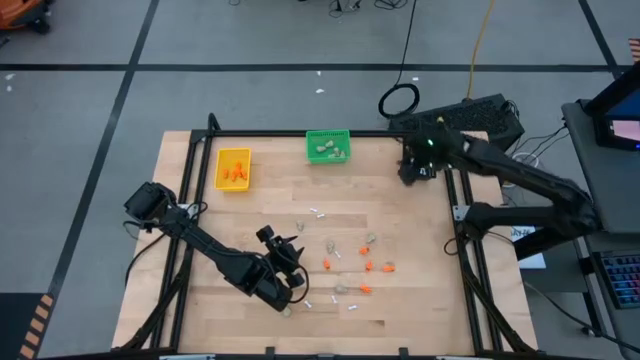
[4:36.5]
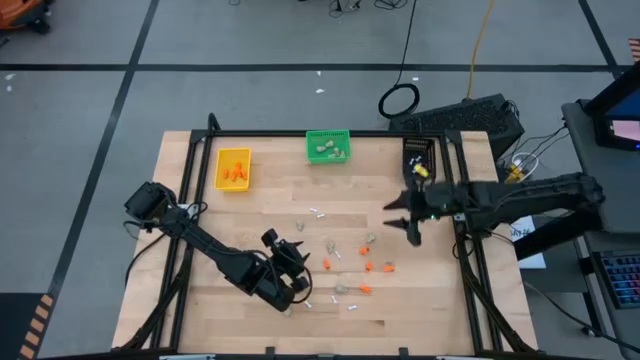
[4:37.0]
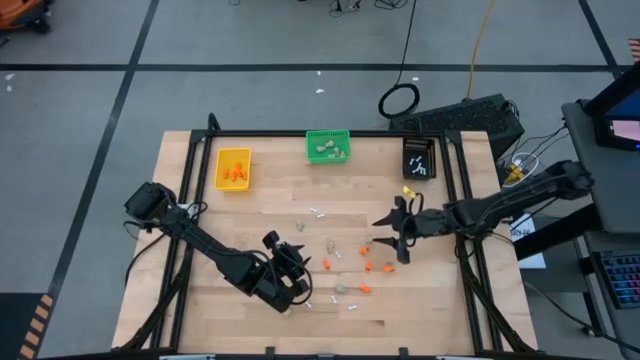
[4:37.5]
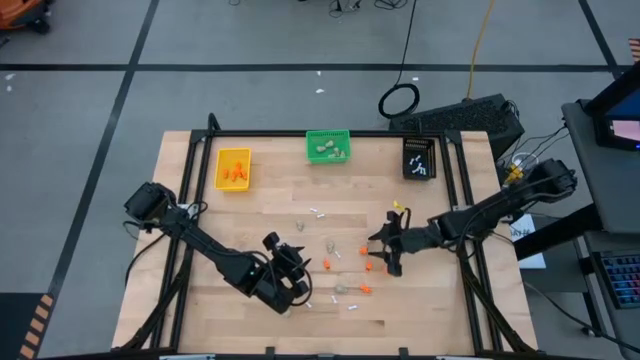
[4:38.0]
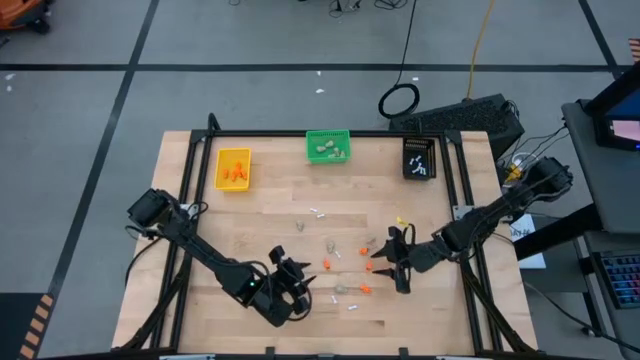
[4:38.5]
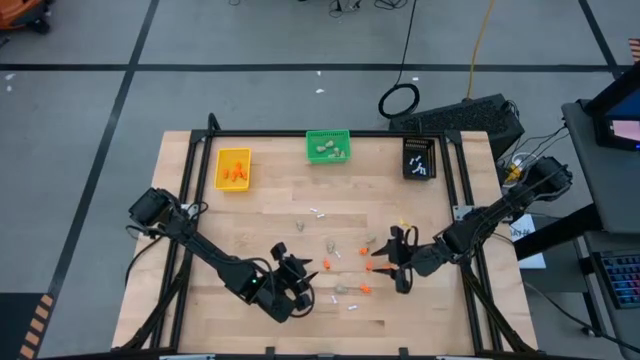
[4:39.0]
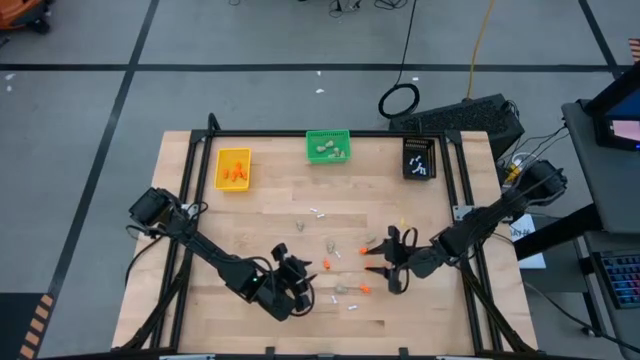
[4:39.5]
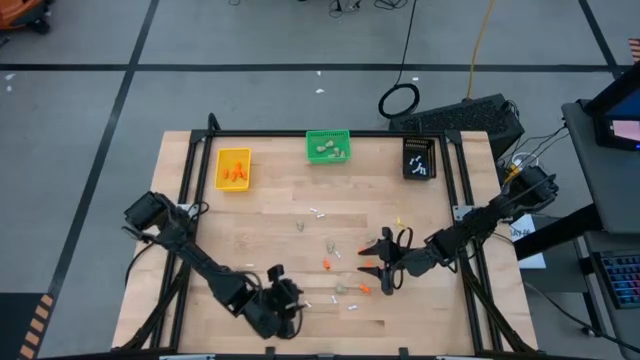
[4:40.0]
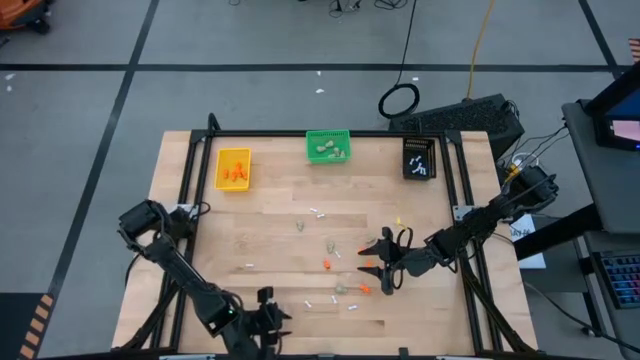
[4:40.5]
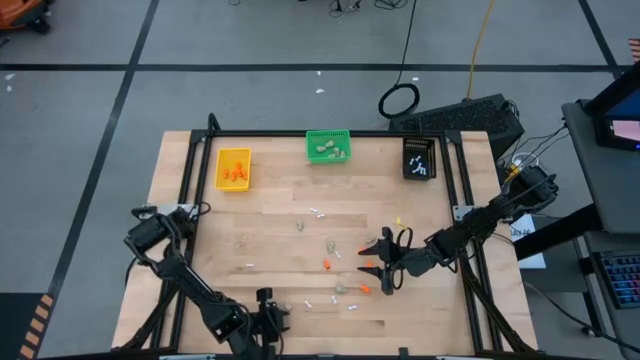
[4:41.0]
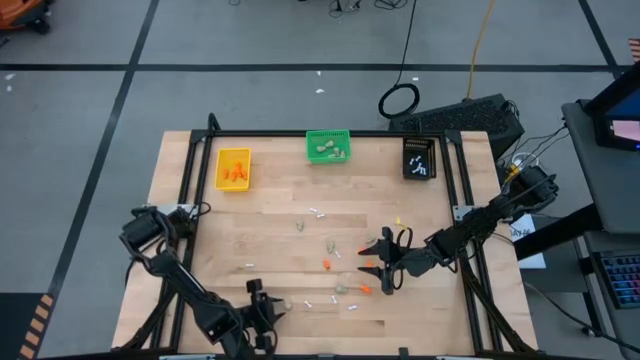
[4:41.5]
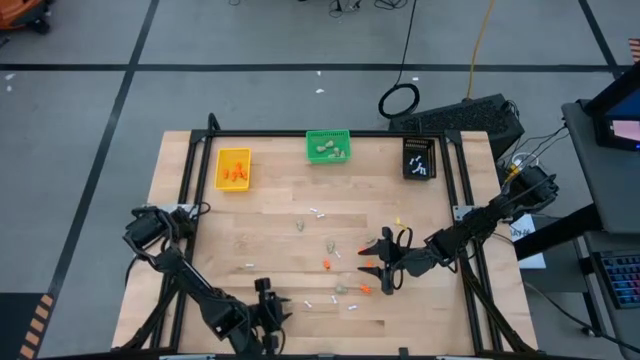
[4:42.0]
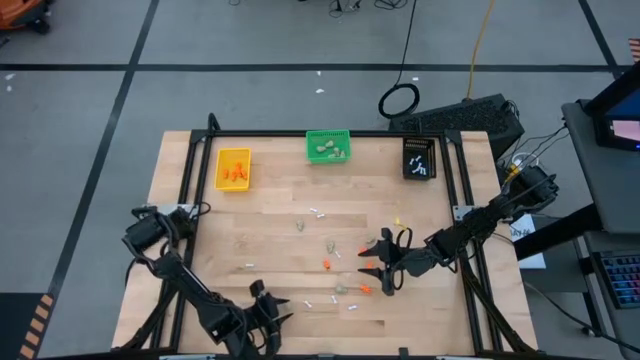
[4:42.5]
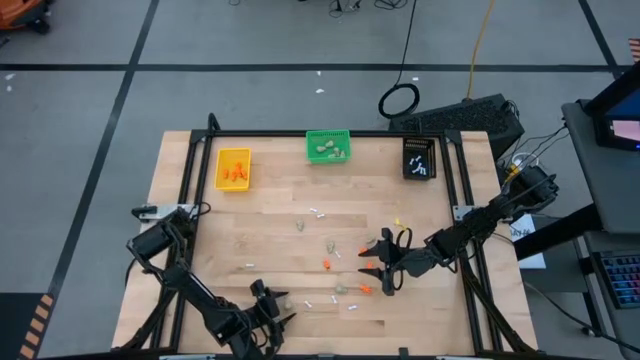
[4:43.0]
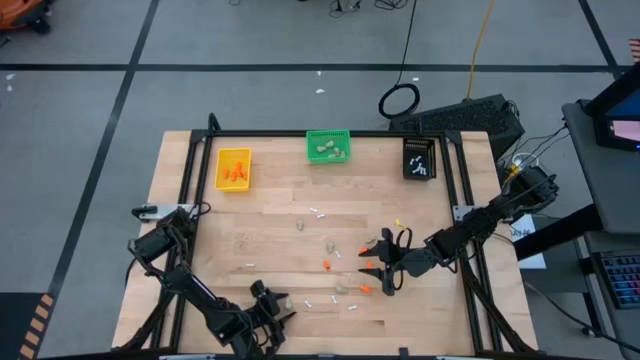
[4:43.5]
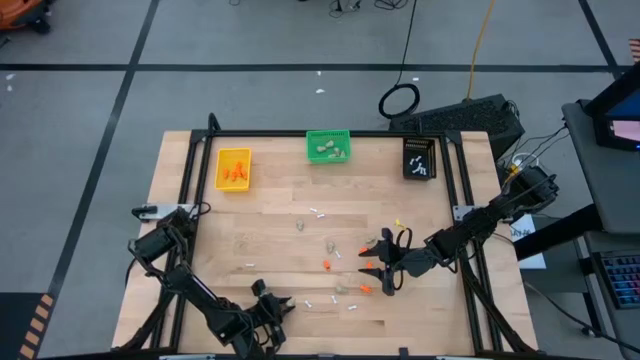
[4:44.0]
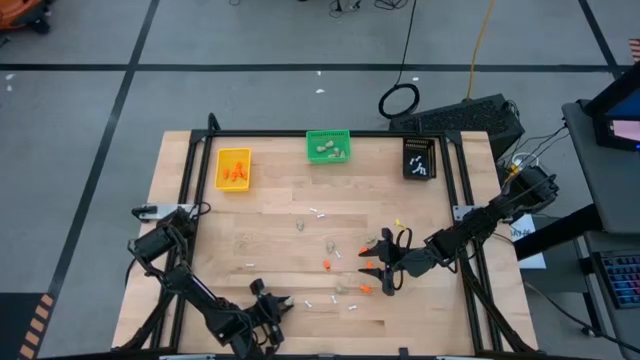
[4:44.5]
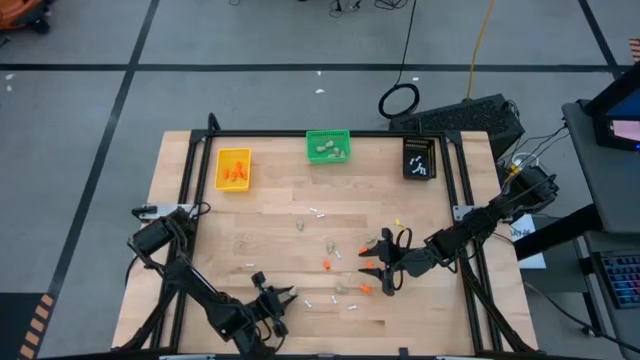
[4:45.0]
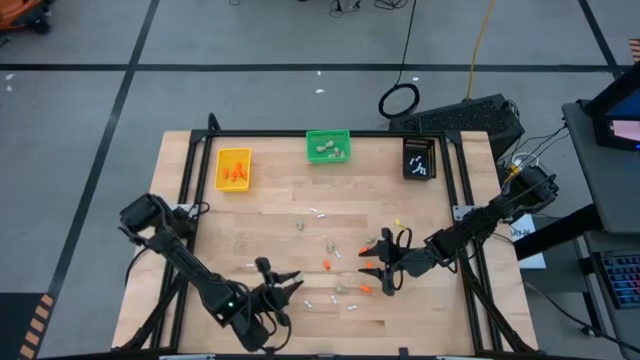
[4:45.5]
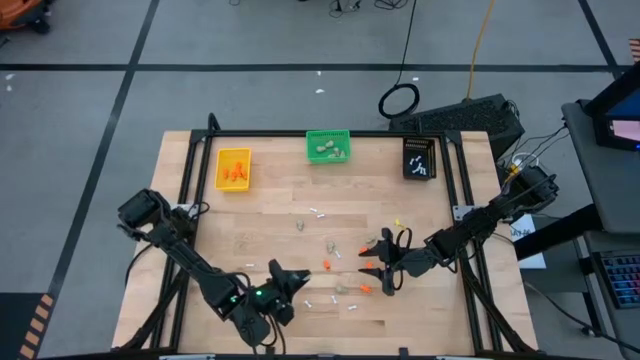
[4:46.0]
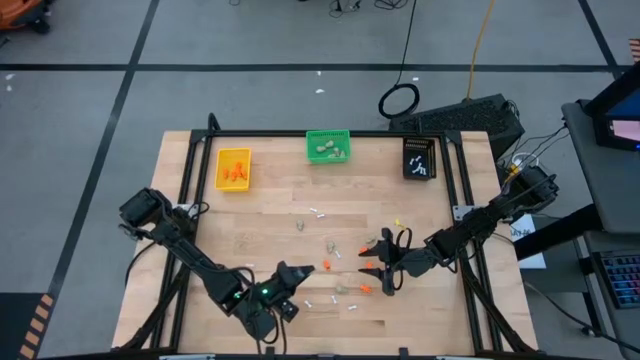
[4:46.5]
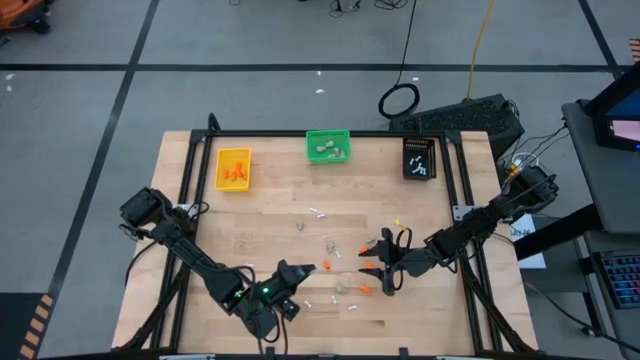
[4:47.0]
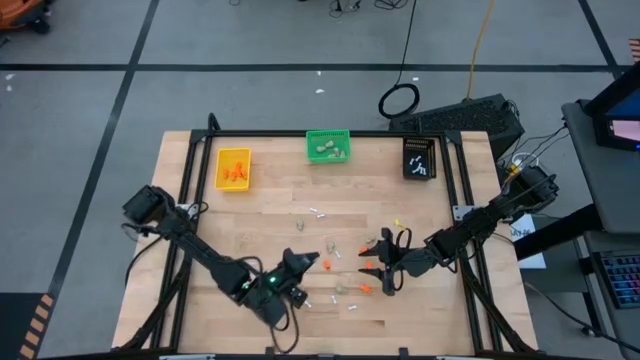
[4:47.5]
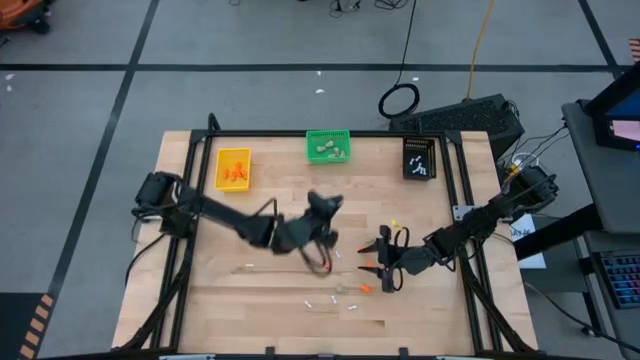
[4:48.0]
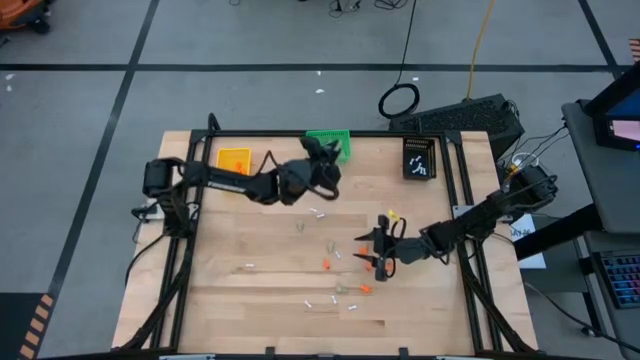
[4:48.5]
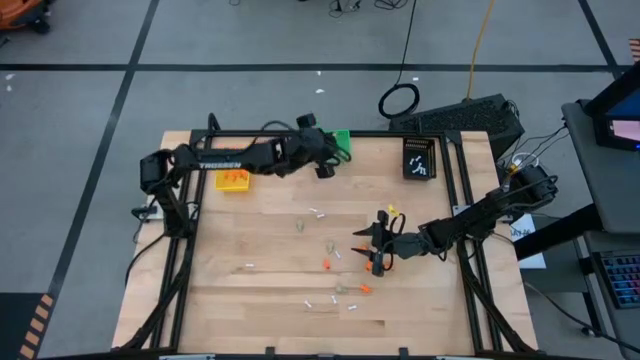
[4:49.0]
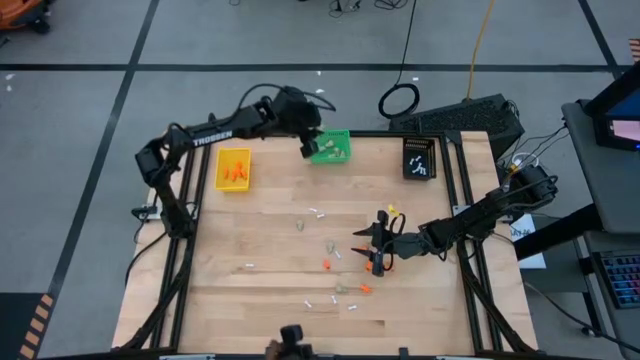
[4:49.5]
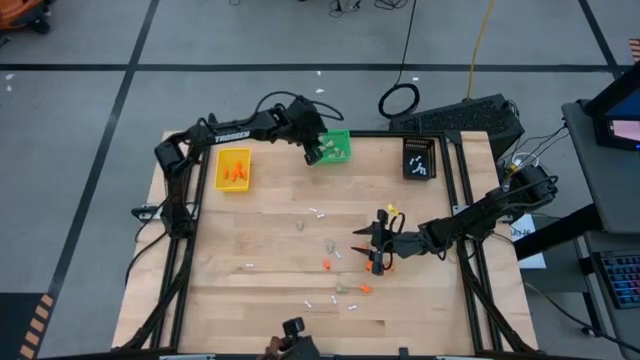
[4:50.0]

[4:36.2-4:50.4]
Task: Sort Halloween decoration
Put the gray skull toy into the green bin

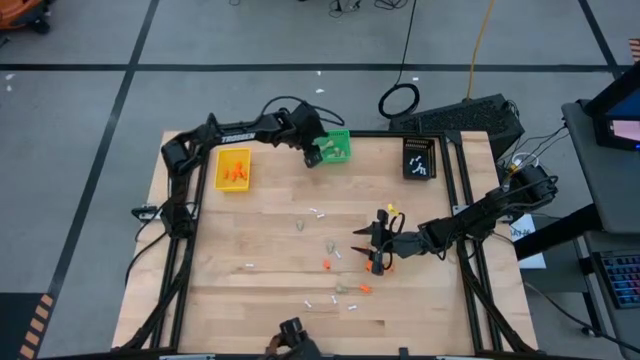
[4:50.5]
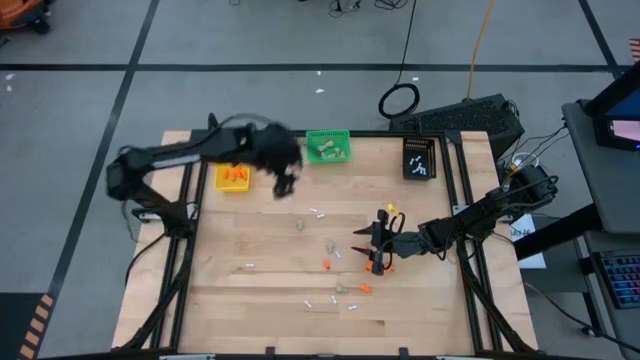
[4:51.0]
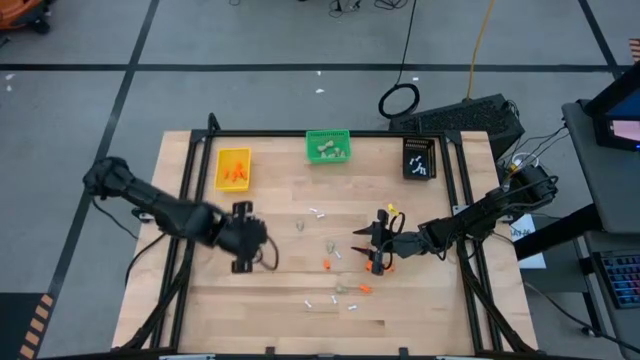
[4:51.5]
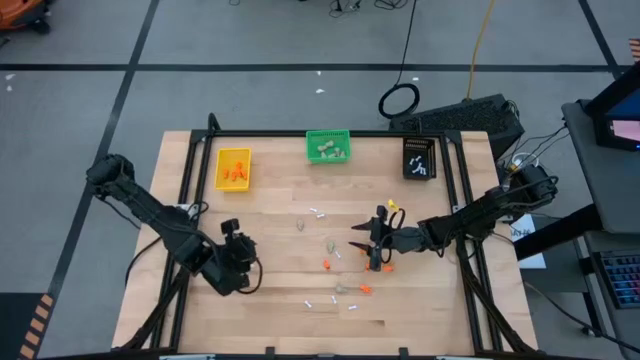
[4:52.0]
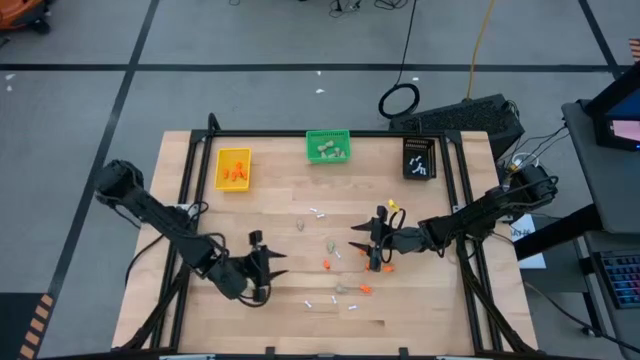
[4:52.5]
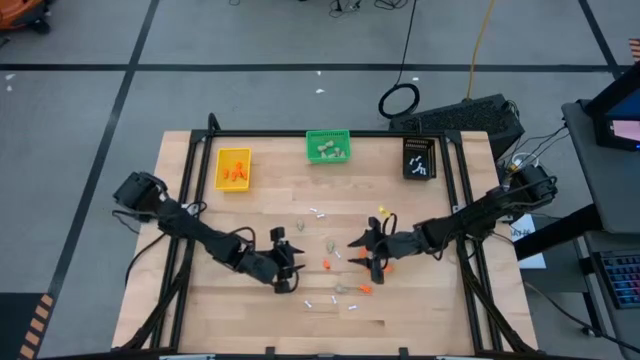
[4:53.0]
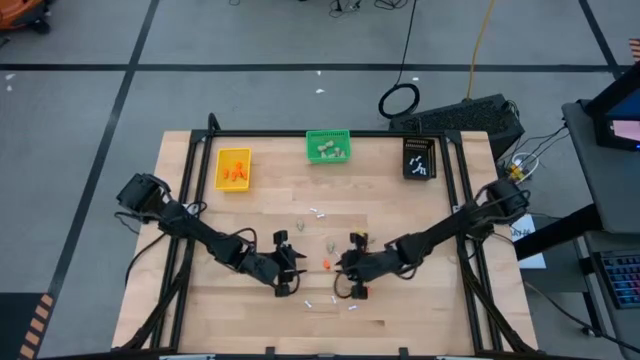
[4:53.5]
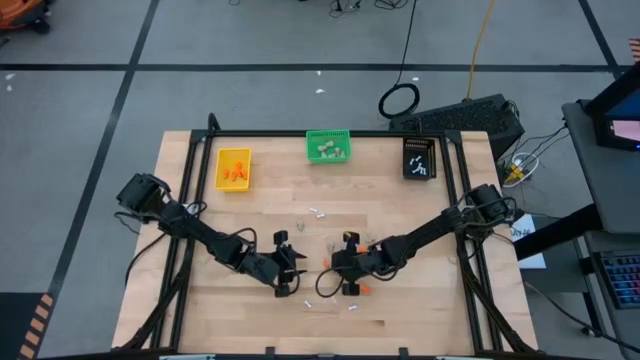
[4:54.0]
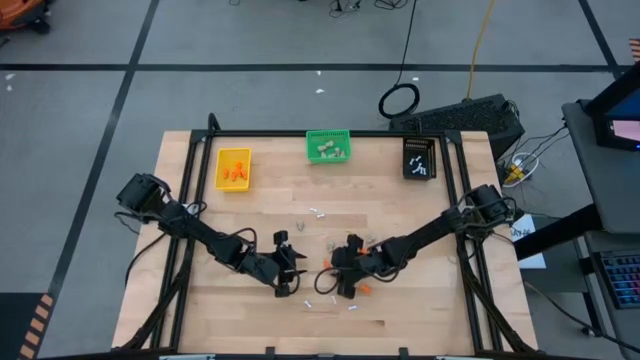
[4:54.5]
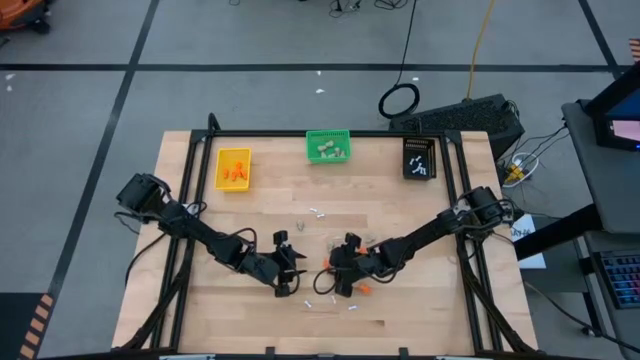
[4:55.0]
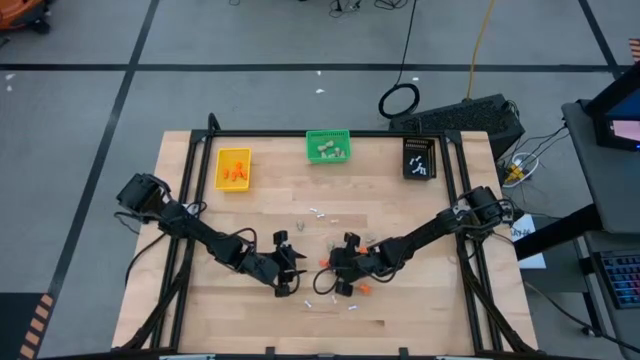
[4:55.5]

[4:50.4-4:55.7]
Put the orange skeleton toy into the yellow bin
